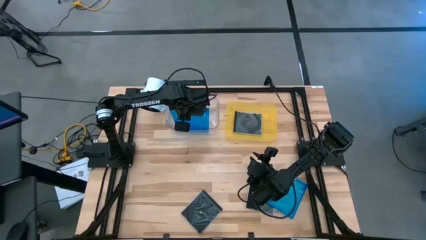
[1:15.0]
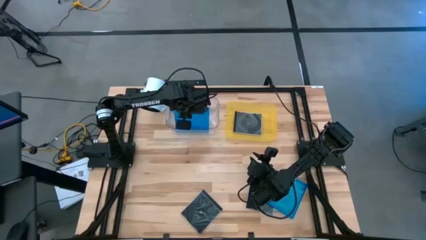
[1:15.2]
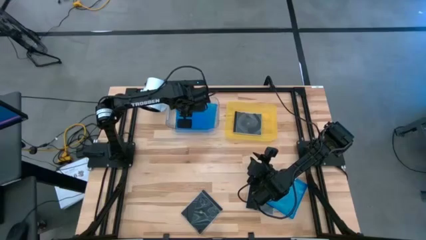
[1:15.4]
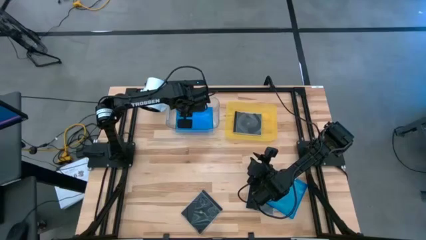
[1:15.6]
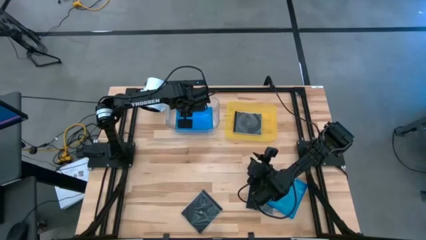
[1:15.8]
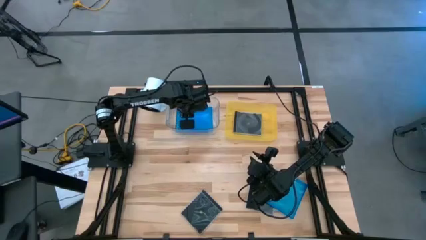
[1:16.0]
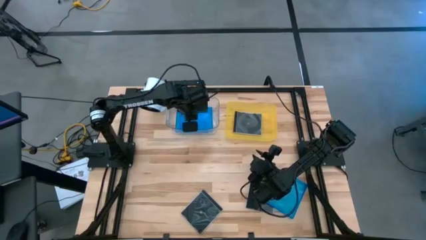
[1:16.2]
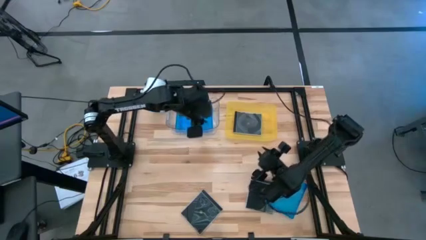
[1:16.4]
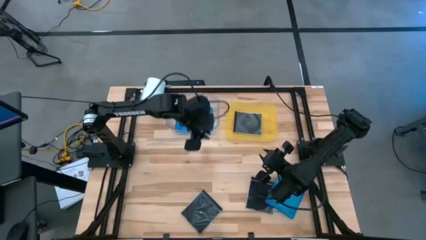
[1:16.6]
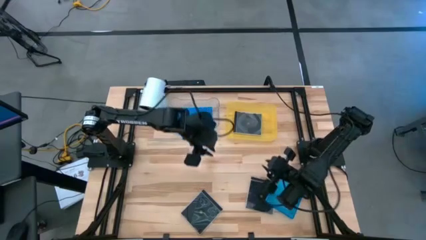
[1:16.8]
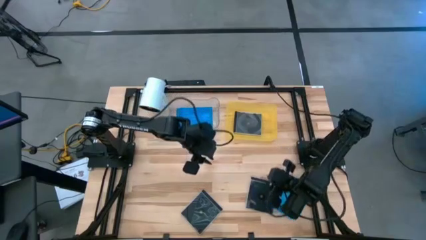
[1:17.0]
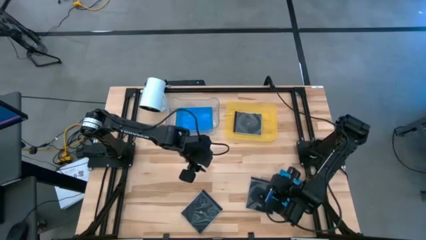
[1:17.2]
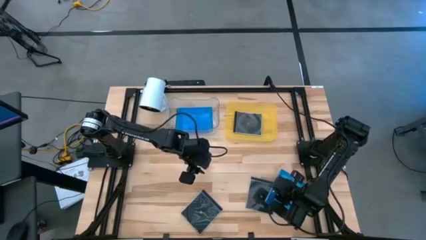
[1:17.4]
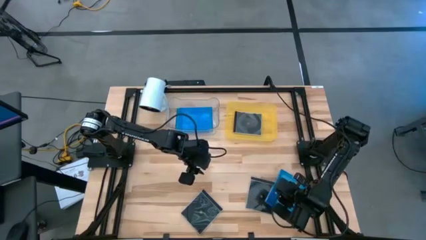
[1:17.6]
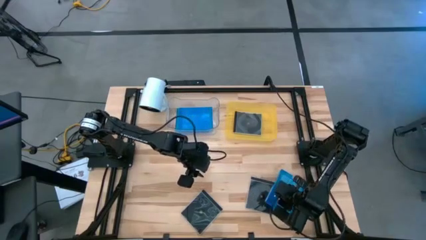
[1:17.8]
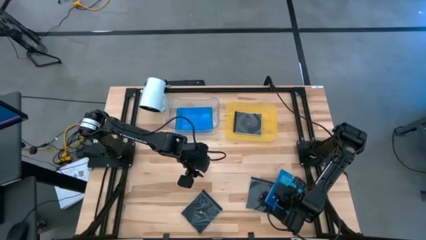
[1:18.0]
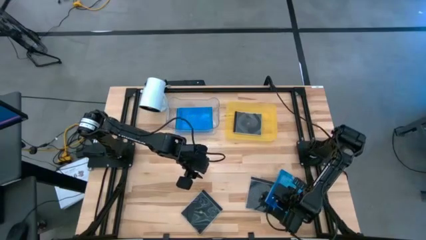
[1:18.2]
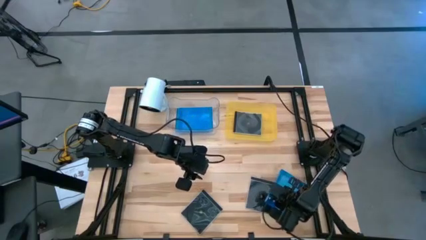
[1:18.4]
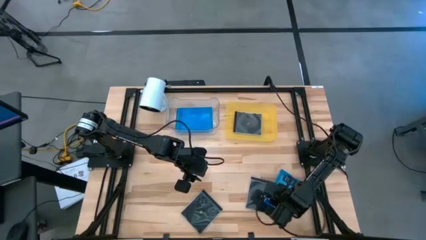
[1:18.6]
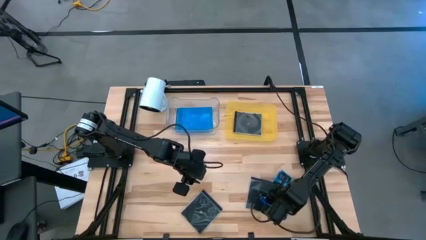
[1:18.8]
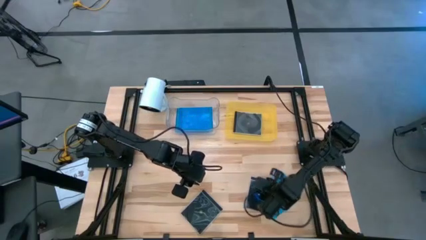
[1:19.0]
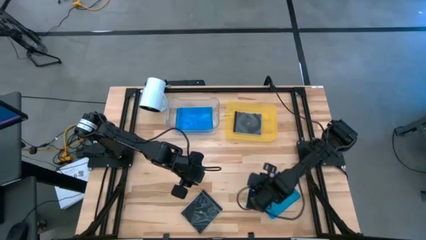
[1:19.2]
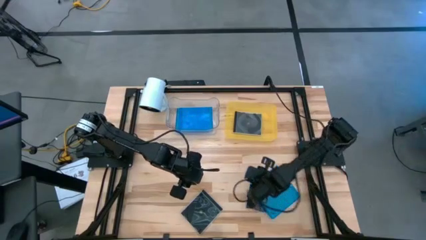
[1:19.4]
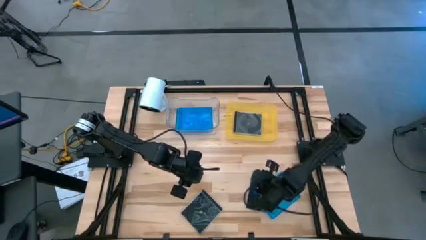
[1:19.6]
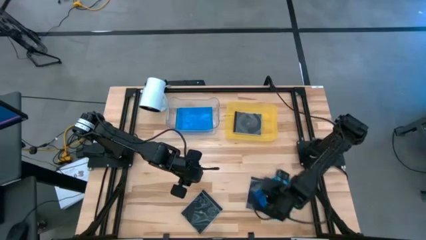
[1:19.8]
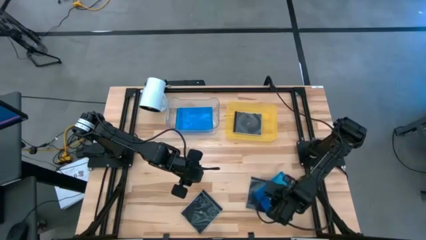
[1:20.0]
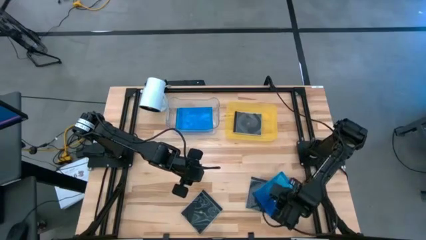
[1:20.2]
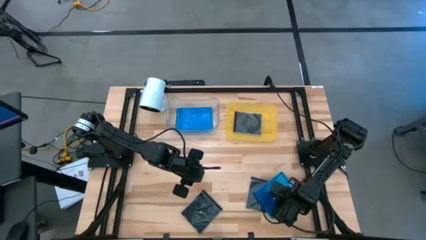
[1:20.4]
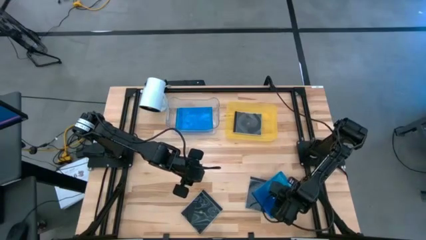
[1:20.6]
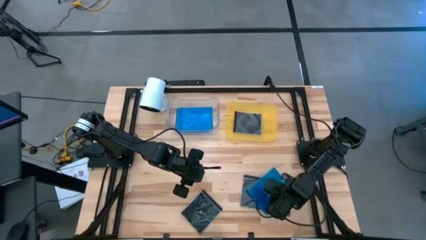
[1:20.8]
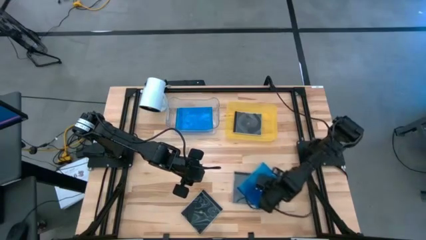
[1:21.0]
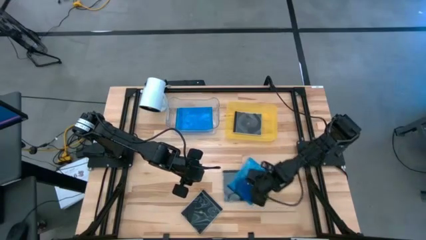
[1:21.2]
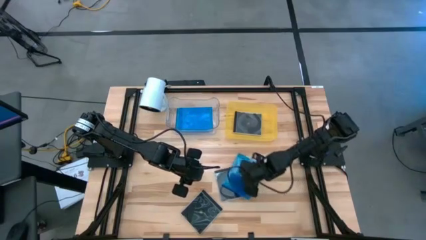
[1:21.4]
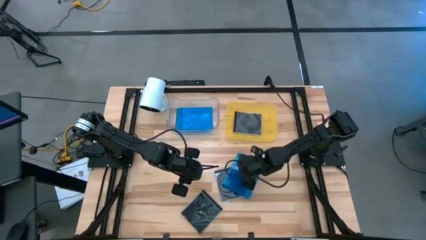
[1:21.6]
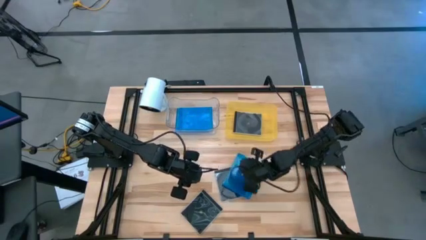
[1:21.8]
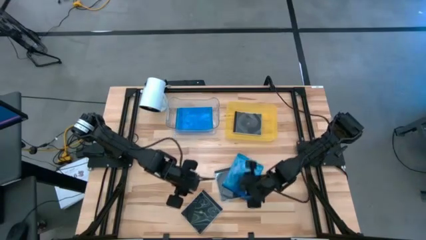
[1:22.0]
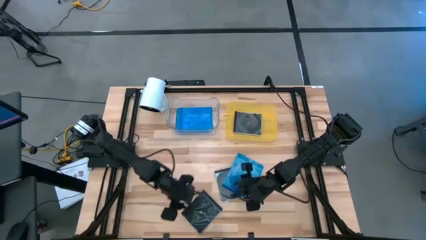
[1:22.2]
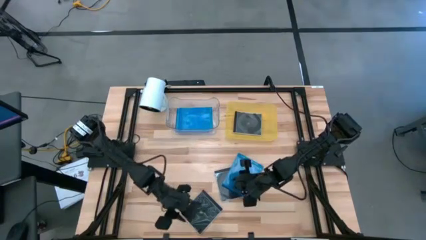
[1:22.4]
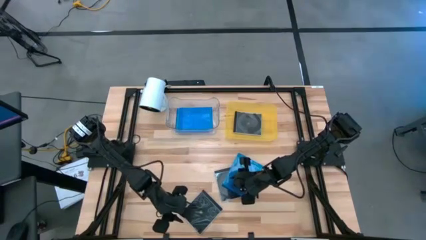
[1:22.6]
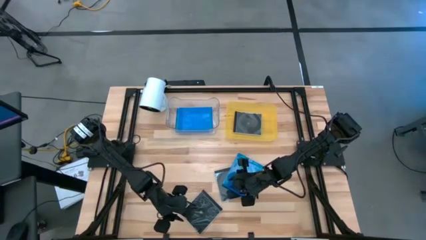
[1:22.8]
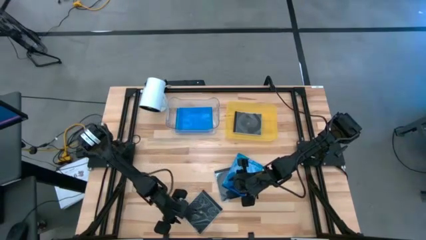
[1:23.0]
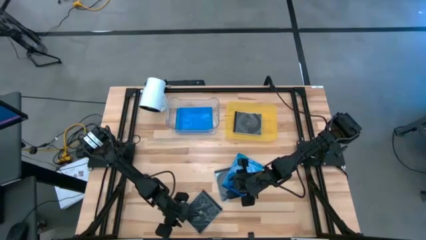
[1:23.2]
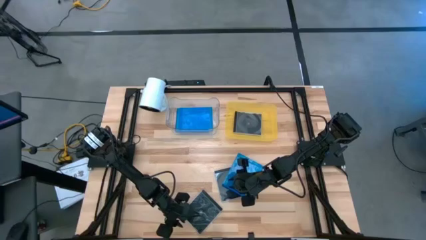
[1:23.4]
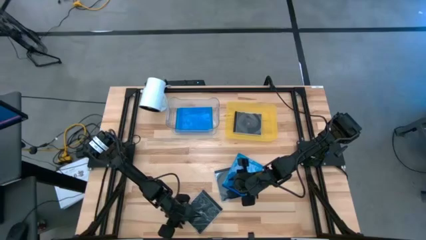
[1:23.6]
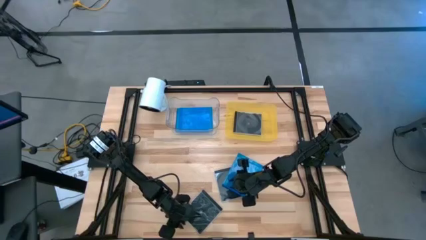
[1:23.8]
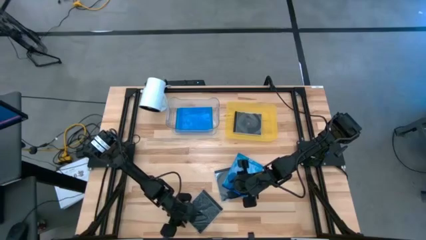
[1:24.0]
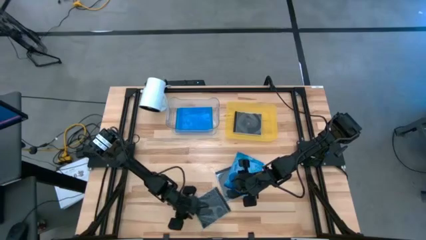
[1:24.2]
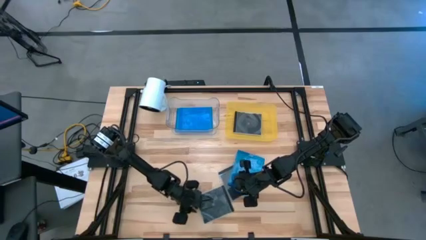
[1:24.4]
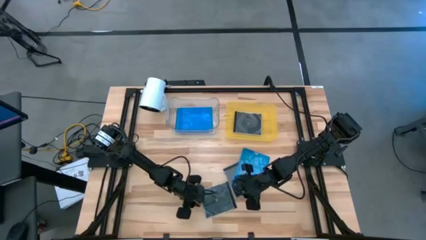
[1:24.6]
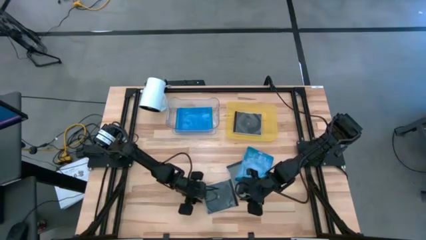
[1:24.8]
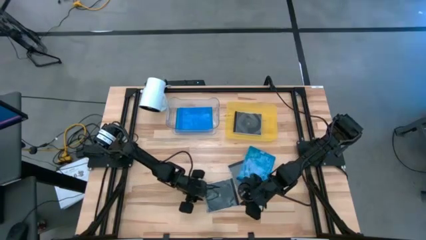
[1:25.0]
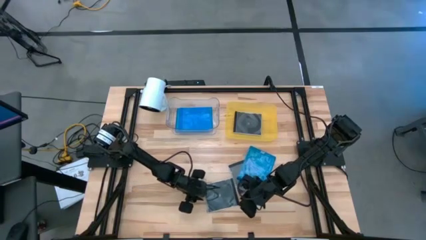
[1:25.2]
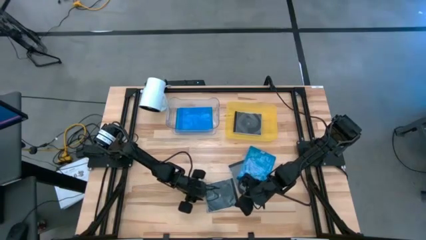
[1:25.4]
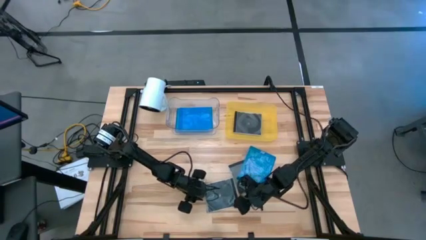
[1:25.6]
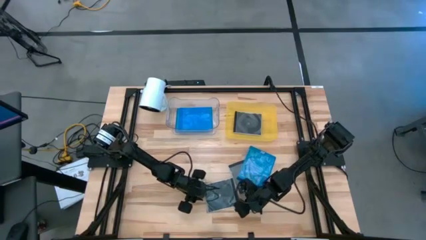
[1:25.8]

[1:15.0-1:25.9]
Task: Pick & place jewel cases by type
Move the CD cases to the center of the table
